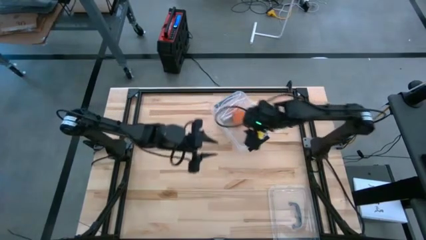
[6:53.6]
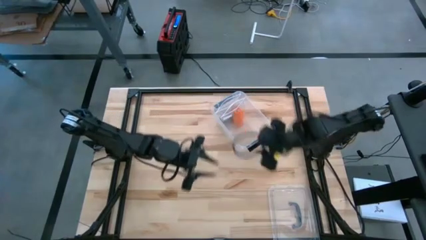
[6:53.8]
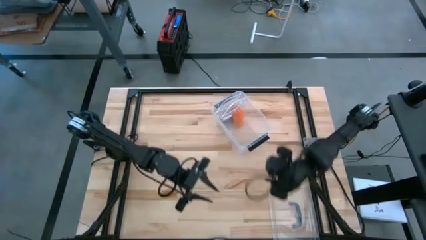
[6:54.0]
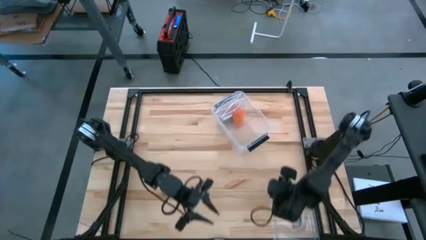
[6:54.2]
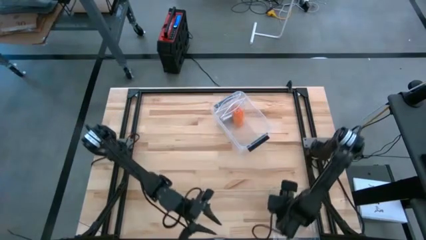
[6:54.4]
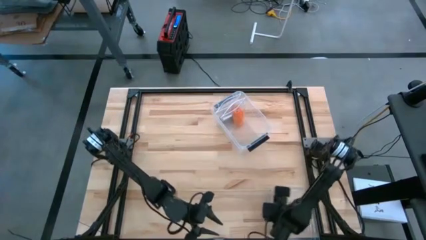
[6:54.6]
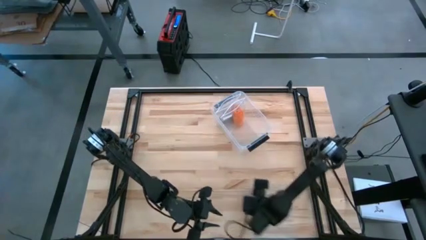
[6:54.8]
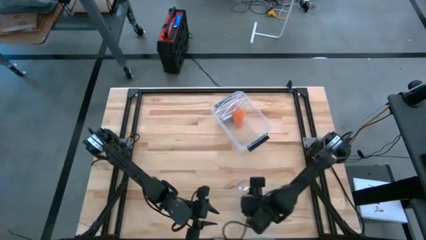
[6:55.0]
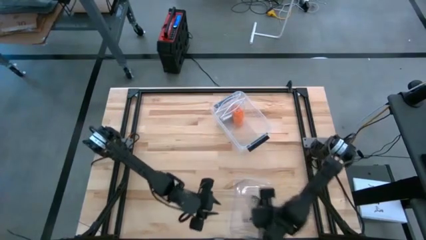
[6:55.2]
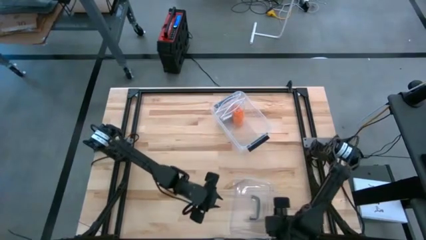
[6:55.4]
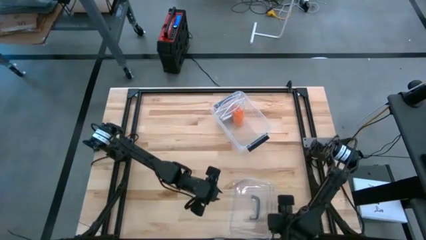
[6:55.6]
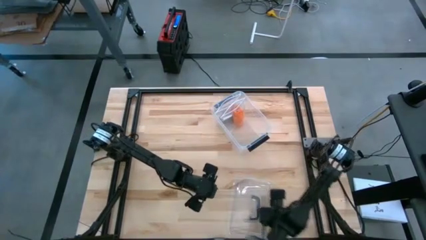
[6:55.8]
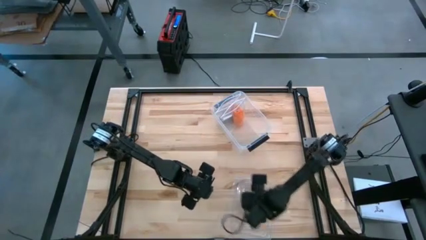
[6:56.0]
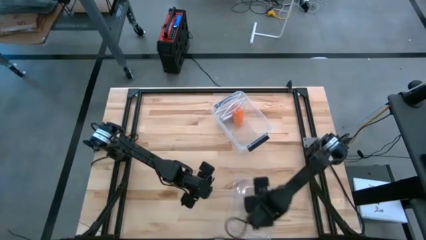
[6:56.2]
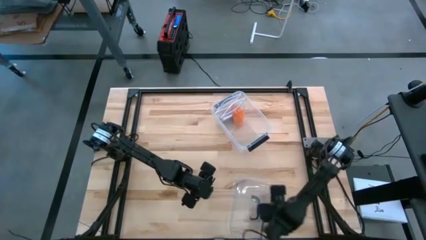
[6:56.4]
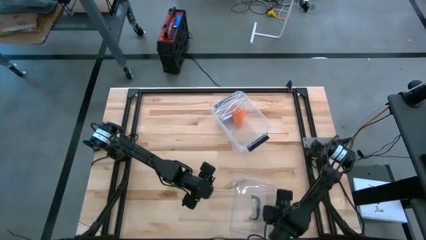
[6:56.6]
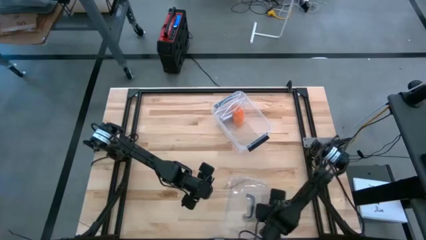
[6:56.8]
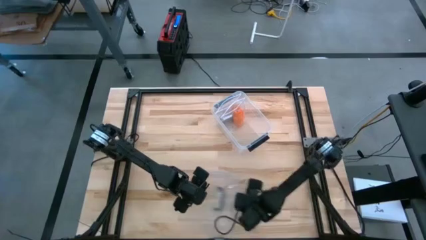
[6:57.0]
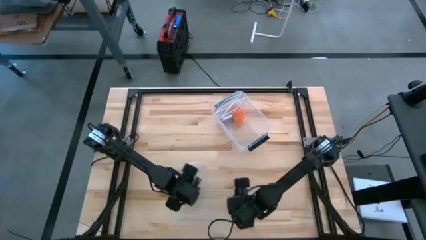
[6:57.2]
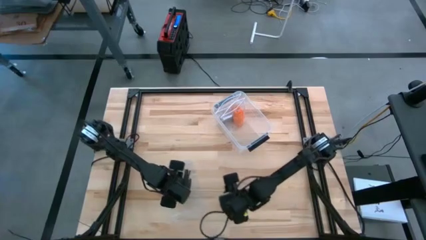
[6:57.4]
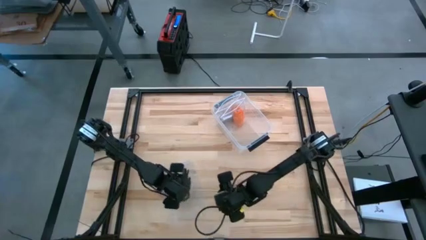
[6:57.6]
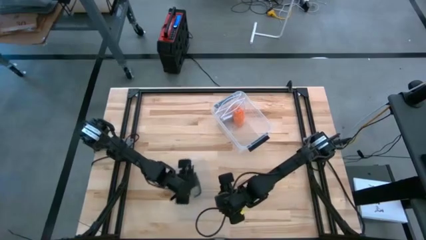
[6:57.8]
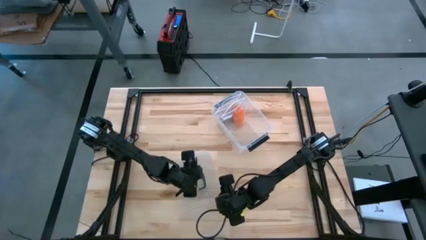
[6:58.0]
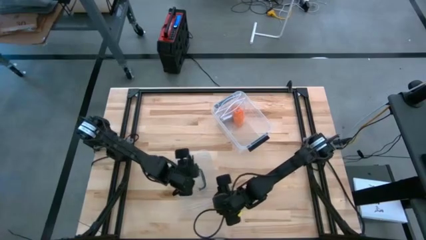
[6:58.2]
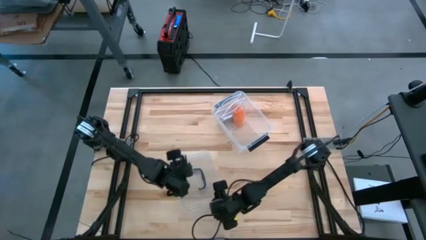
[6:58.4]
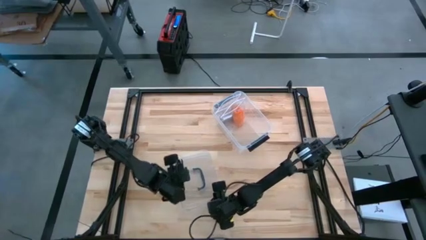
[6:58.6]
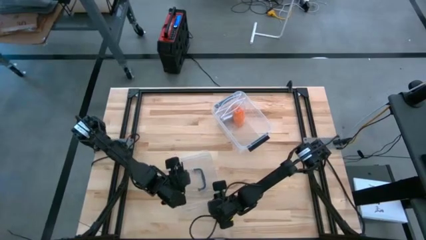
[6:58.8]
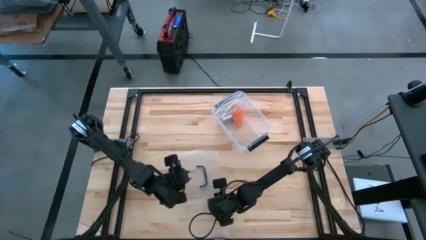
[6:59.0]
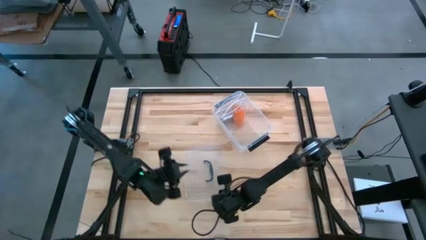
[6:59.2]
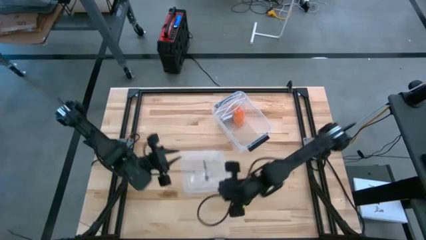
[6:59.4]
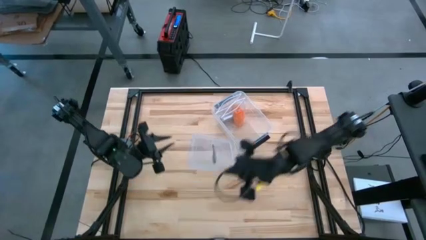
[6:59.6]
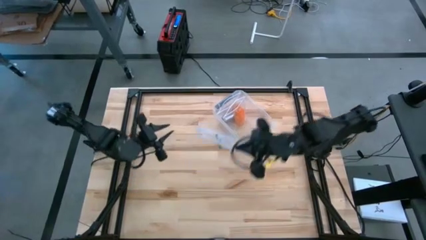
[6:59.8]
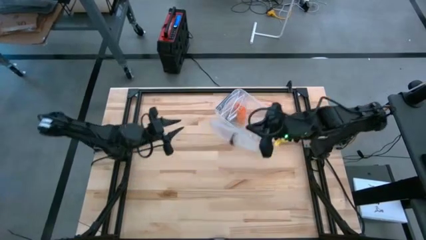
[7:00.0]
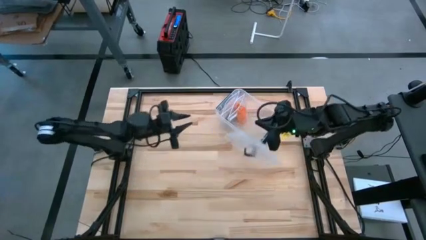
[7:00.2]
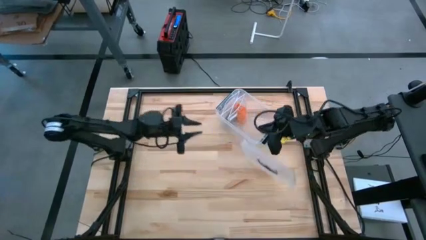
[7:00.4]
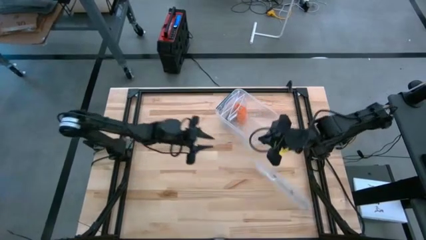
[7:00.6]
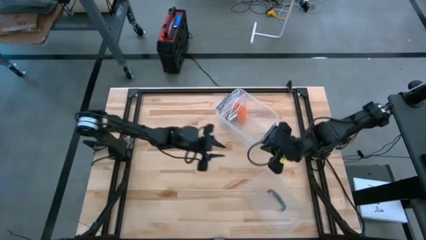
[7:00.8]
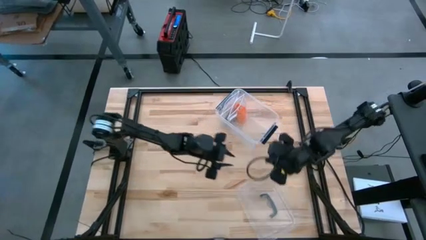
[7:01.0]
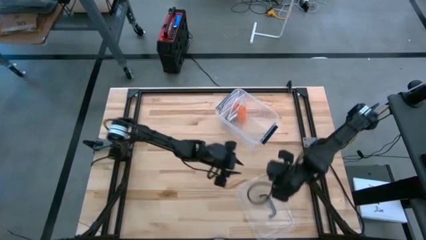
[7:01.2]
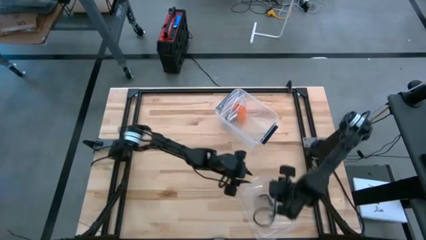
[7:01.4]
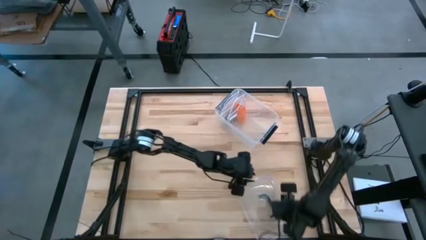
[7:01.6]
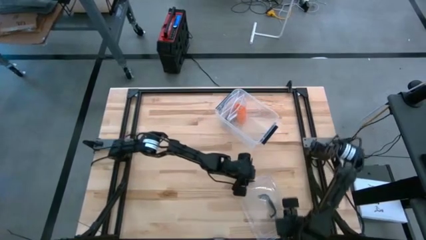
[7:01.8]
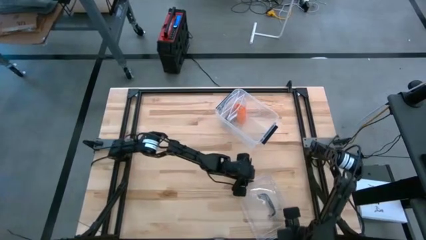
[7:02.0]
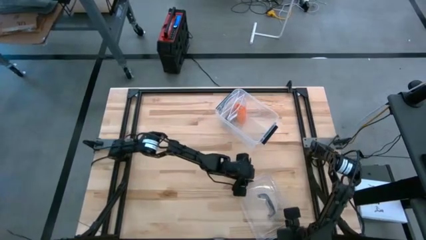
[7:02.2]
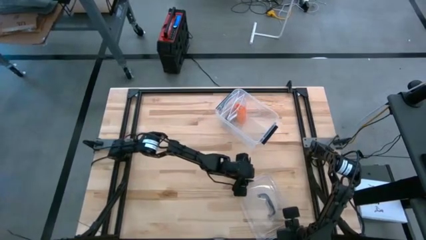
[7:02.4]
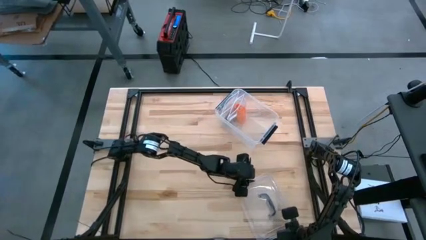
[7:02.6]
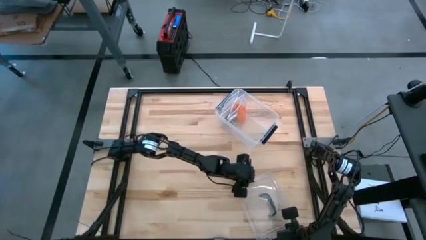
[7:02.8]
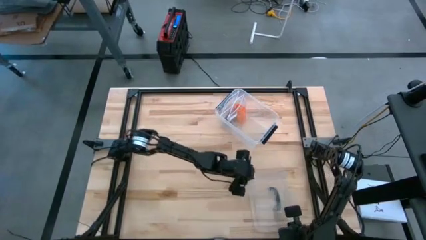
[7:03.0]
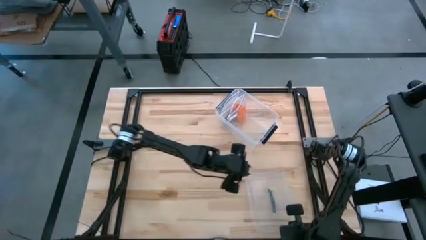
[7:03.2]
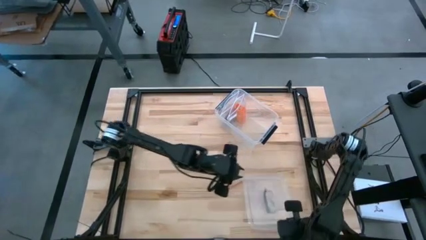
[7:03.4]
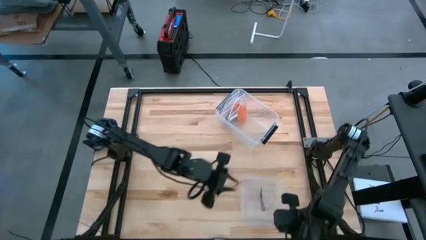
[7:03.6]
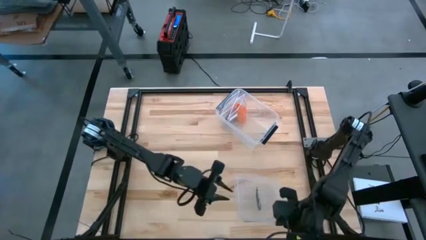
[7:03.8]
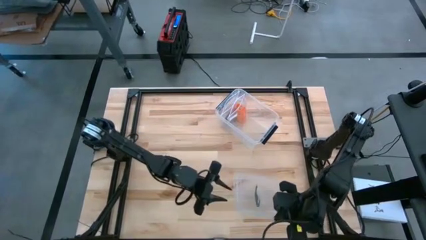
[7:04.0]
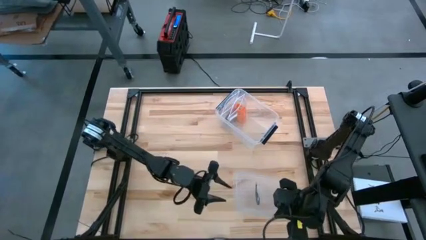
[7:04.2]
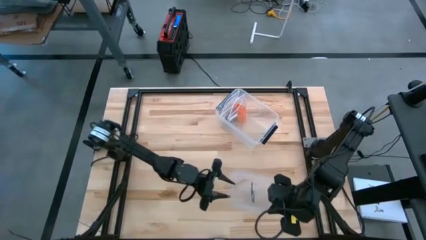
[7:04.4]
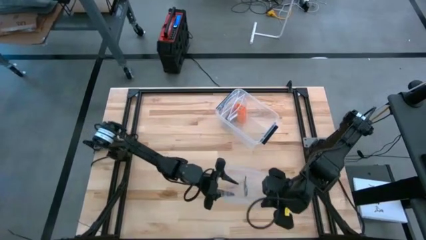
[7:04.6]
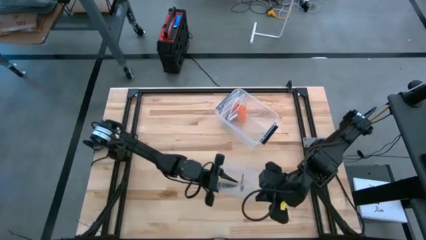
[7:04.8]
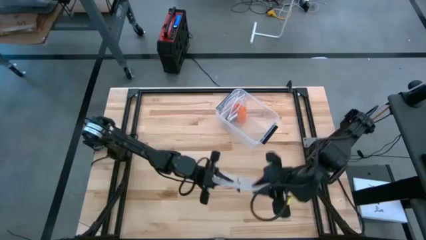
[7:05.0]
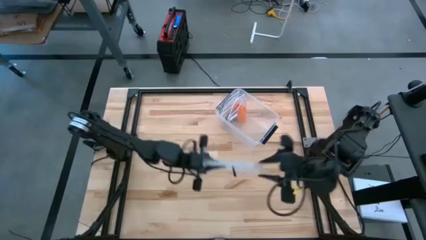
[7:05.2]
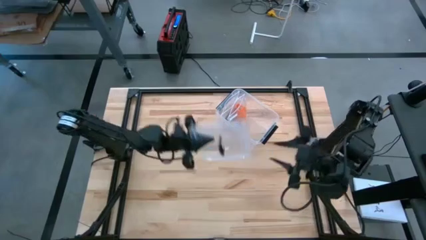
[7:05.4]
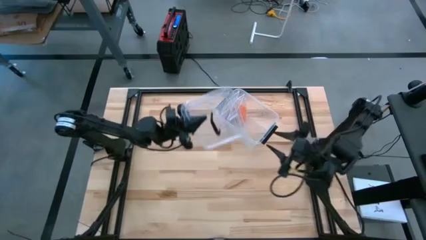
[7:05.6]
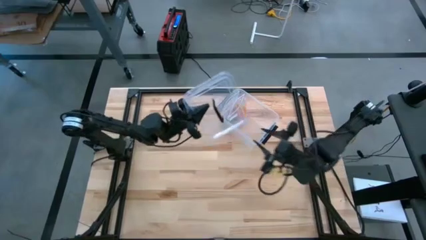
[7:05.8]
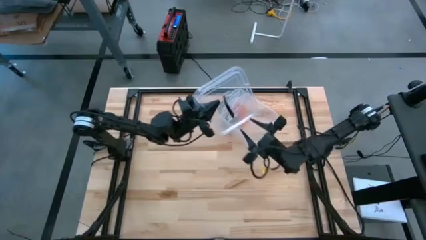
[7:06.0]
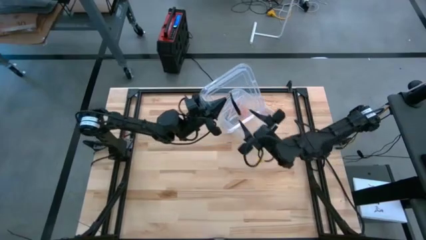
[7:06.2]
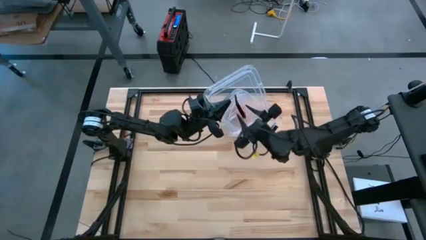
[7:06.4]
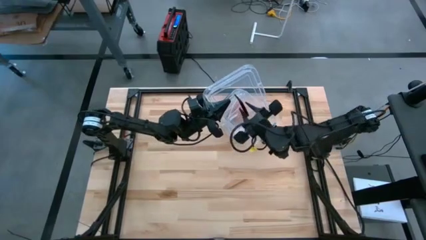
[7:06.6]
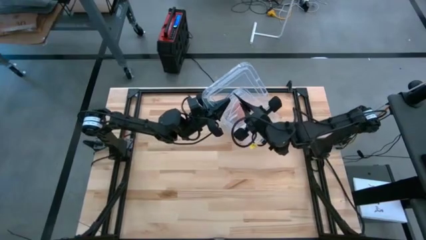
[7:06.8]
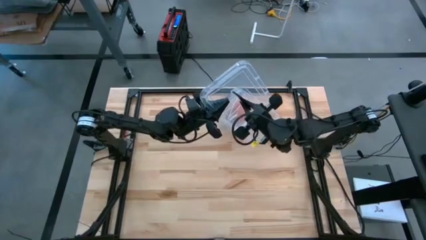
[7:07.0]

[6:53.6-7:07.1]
Task: Roll bandage
Close the transparent bin on the table

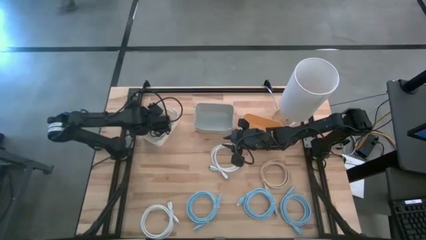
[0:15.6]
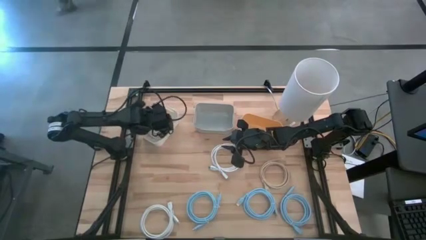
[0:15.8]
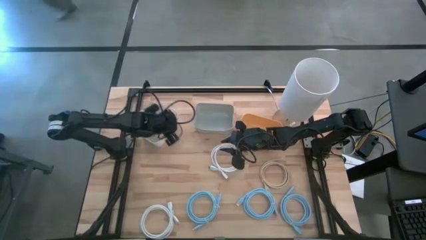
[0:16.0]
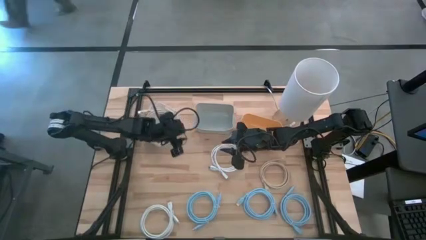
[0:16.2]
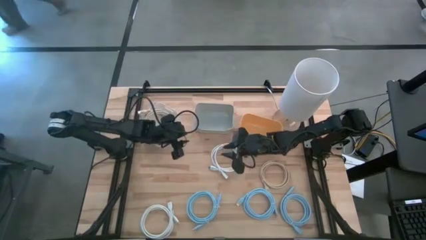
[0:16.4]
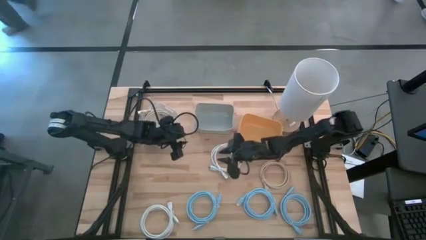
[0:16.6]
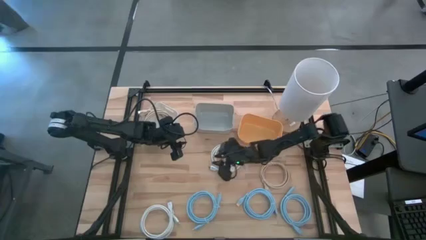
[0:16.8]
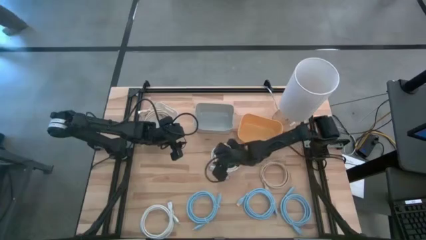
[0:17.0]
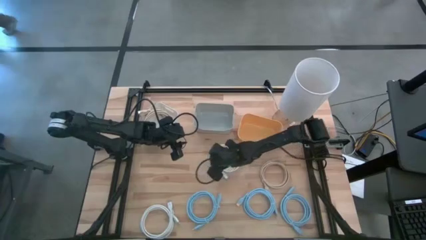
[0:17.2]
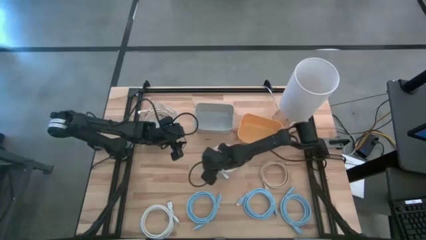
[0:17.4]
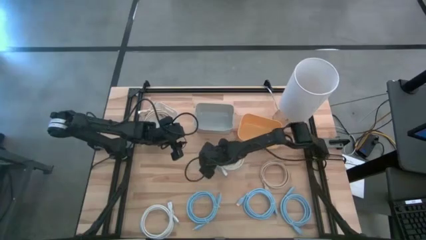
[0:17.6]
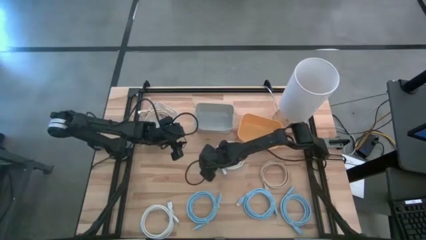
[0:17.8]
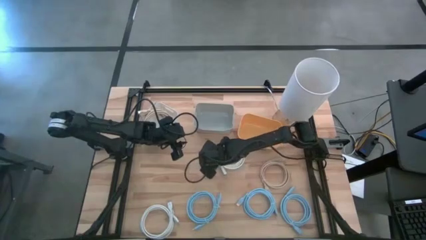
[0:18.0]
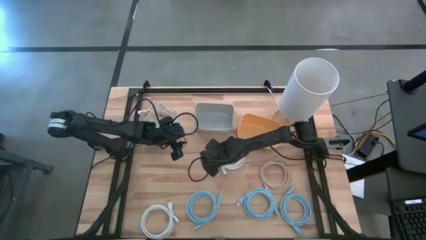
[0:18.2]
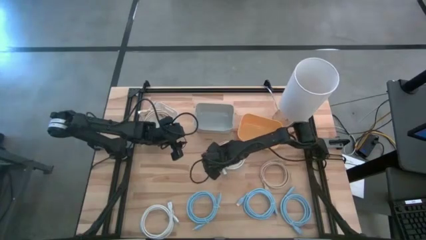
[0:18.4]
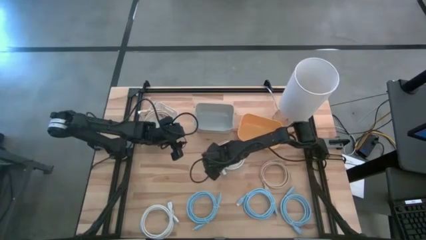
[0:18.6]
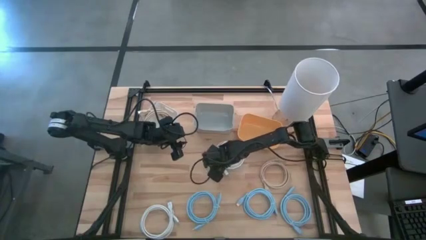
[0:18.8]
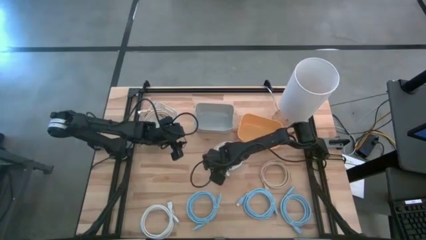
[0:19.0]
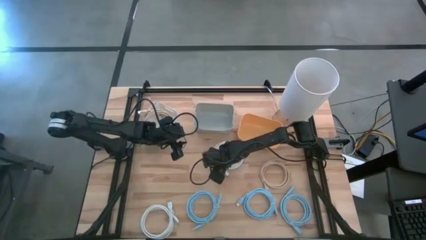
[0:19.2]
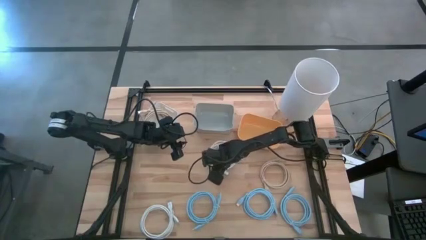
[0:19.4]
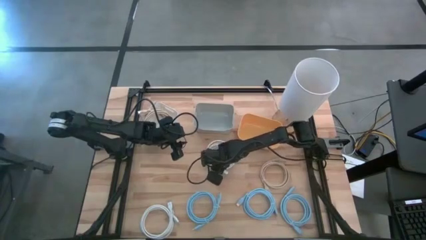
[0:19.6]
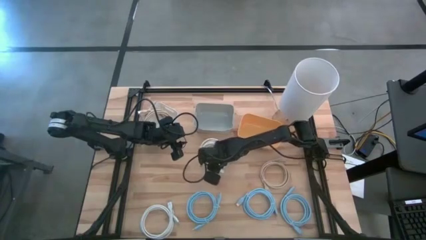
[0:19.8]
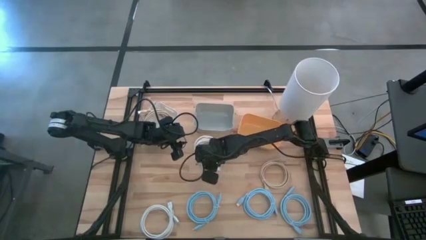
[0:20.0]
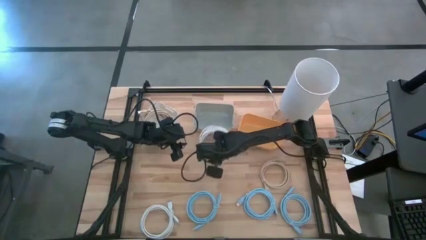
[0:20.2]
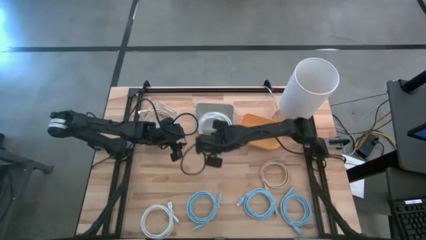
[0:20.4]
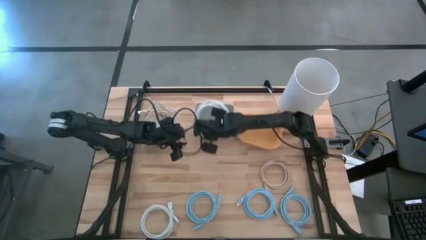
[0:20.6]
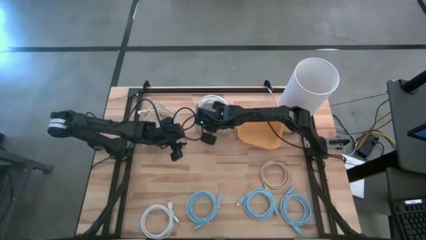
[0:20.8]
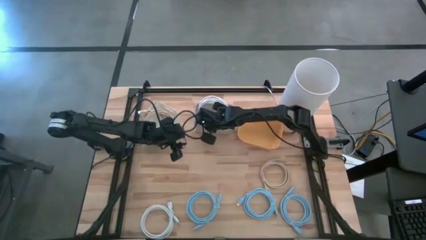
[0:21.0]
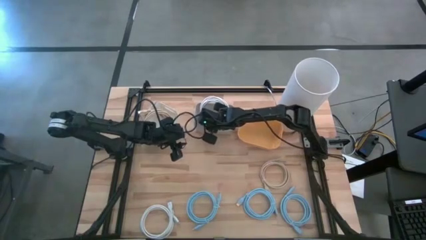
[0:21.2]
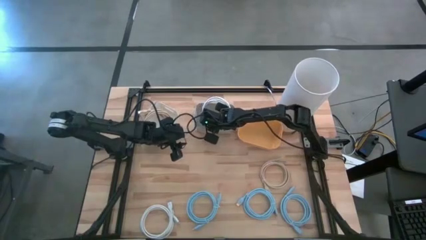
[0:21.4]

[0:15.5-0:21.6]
Task: Sort HDMI cables
Put the top white HDMI cable into the gray bin
